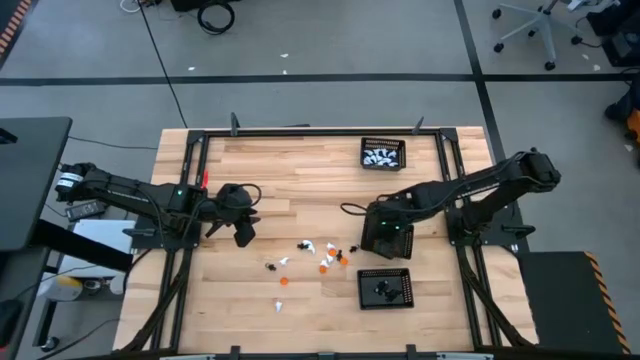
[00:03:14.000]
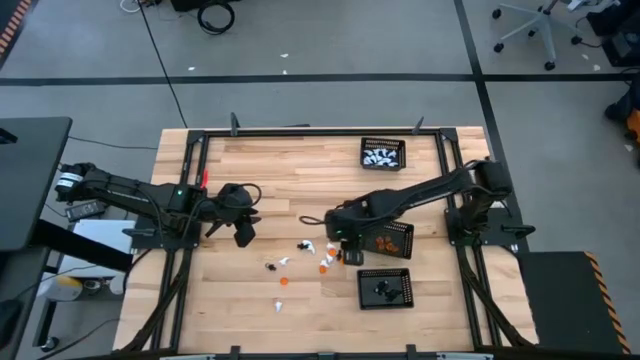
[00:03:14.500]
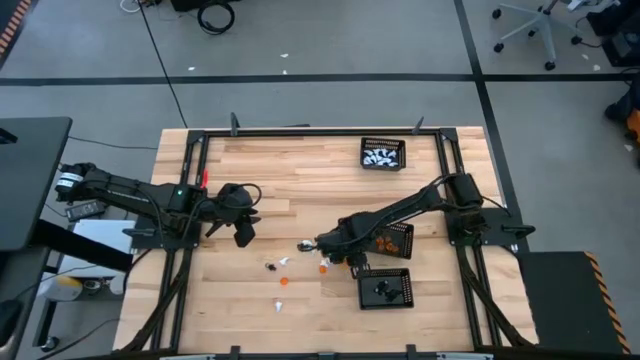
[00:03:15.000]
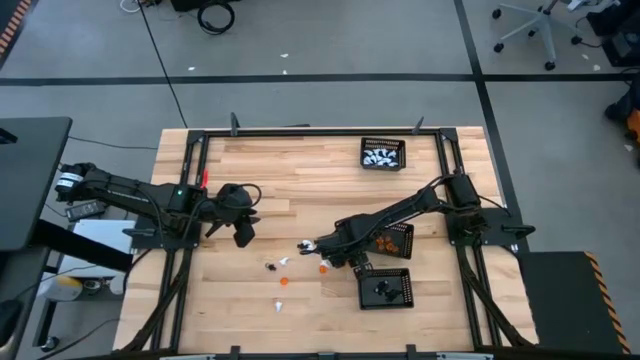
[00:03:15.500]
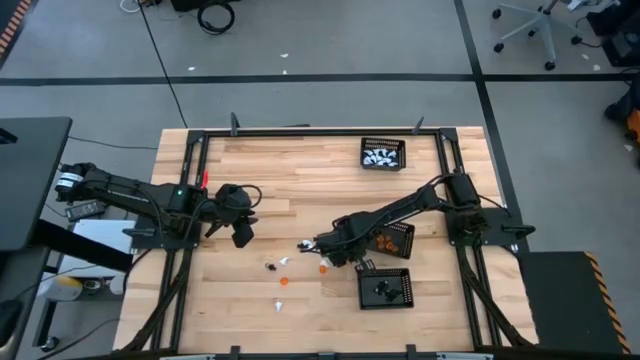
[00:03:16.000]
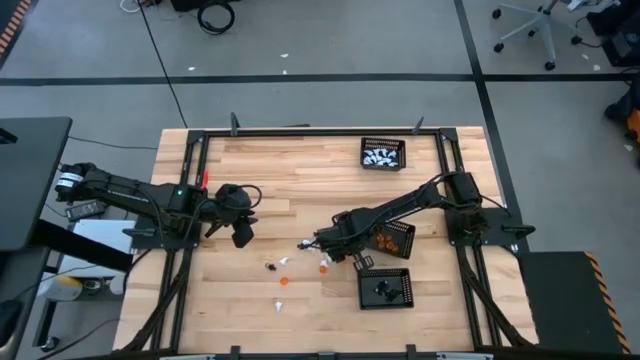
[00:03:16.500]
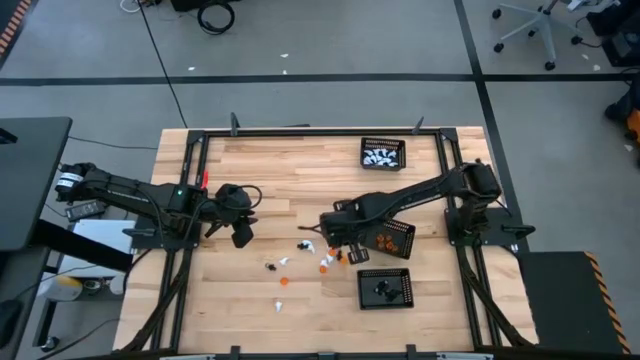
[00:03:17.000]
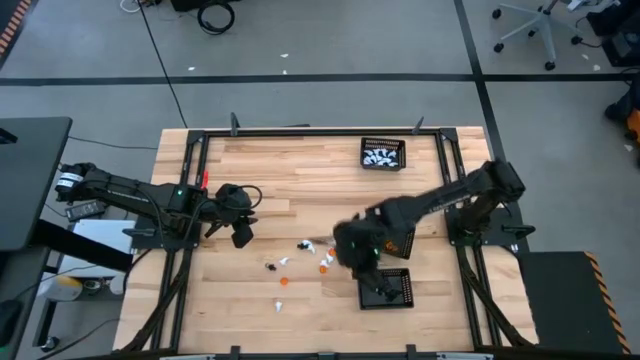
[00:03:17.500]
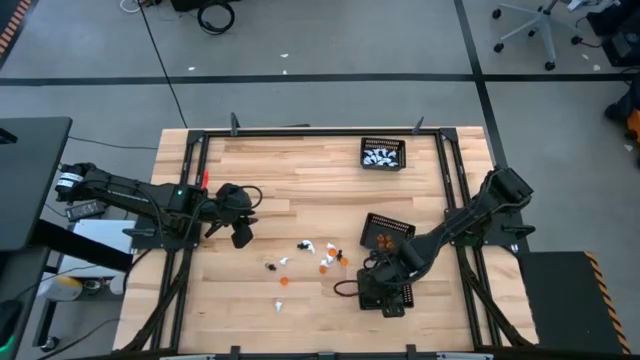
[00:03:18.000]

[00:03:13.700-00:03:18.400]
Task: Sort Halloween decoration
Put the black skeleton toy into the bottom black bin

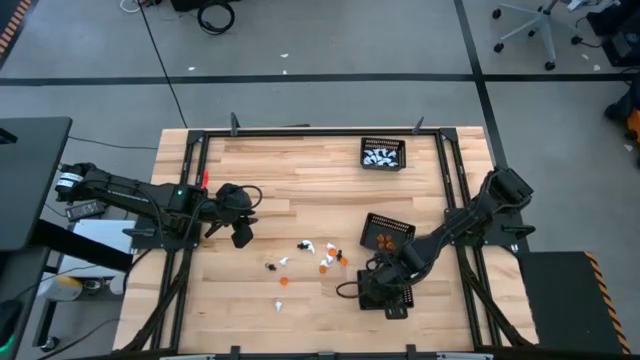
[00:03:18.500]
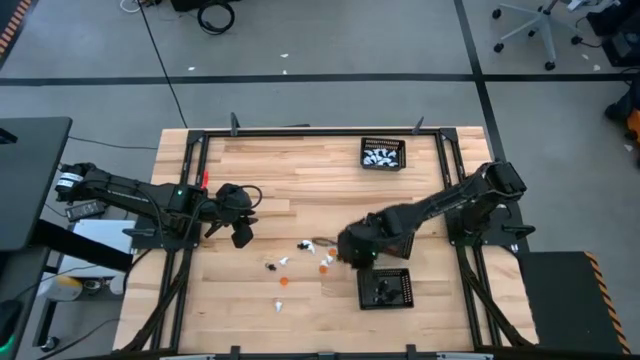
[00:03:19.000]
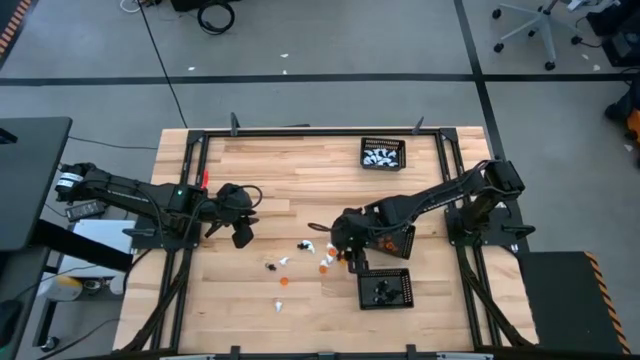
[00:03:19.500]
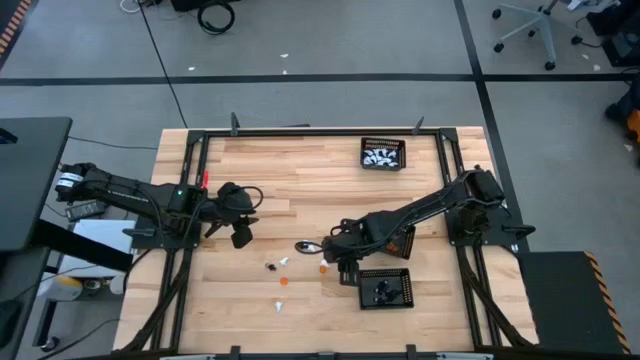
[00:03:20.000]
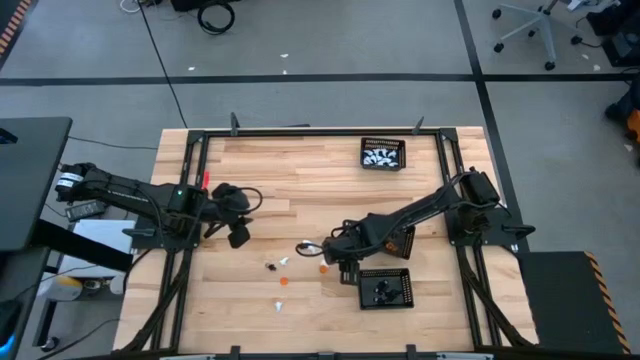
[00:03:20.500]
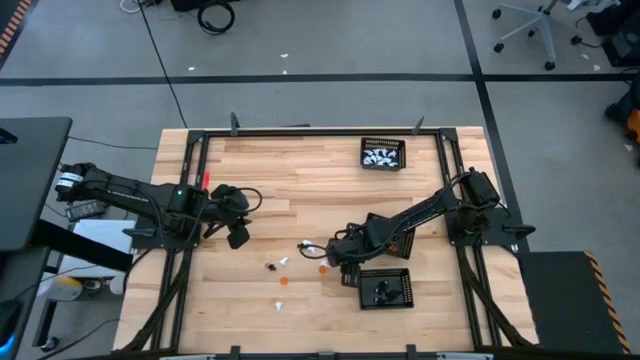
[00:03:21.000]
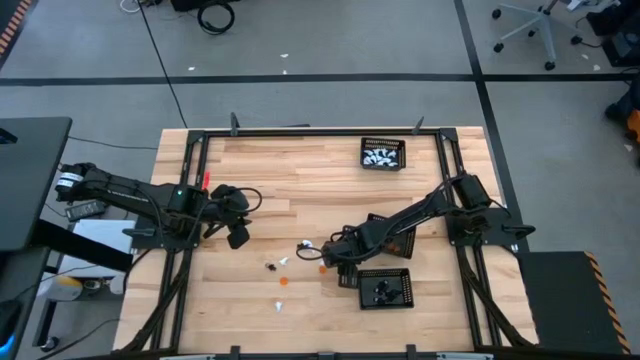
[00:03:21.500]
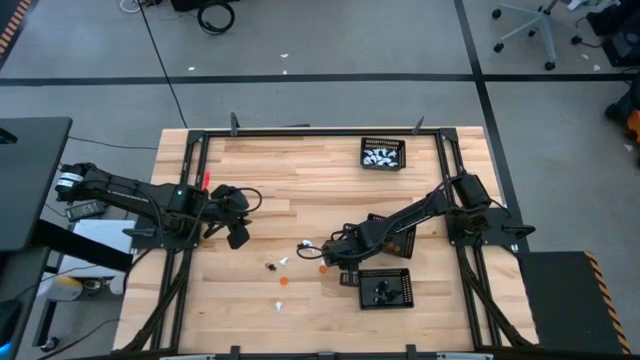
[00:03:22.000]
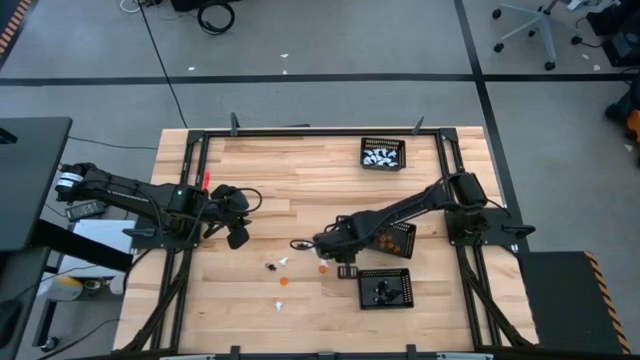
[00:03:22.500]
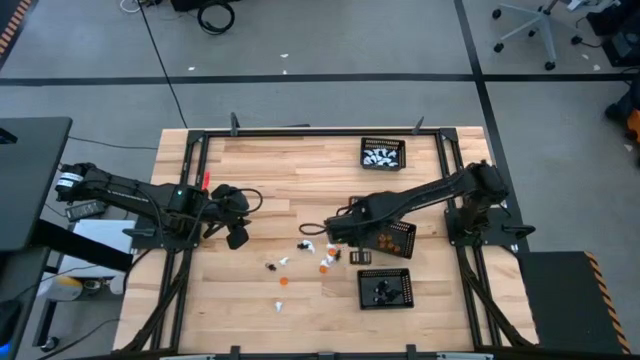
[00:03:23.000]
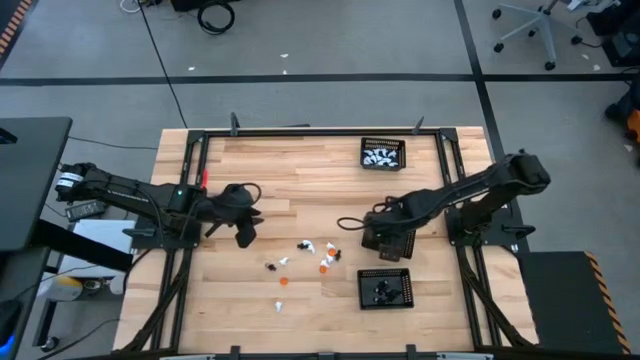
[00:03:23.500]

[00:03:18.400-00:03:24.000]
Put the orange pumpkin toy into the center black bin

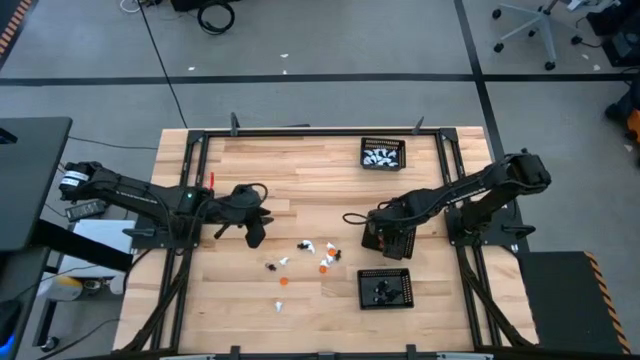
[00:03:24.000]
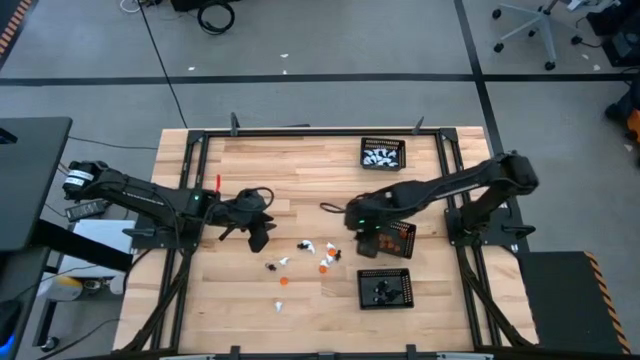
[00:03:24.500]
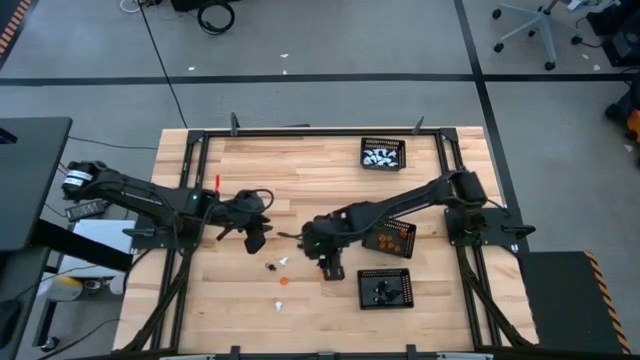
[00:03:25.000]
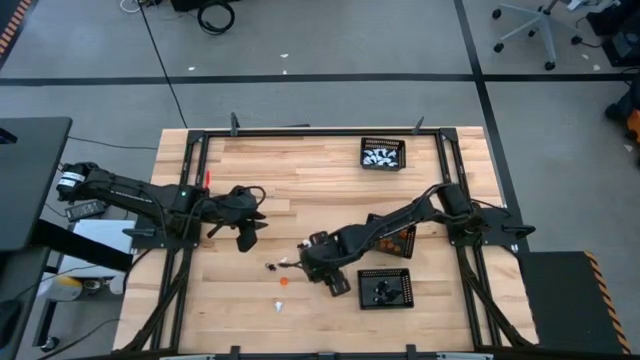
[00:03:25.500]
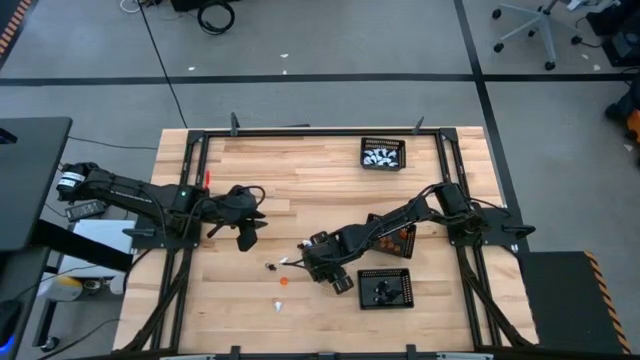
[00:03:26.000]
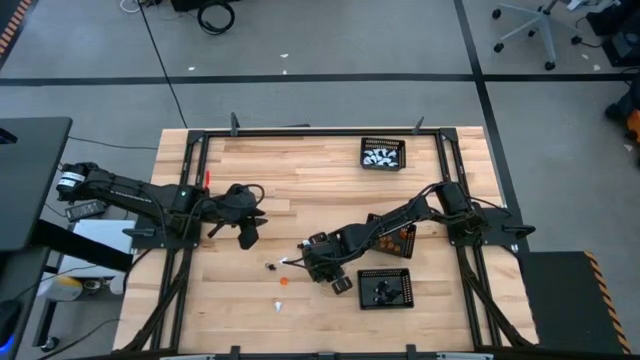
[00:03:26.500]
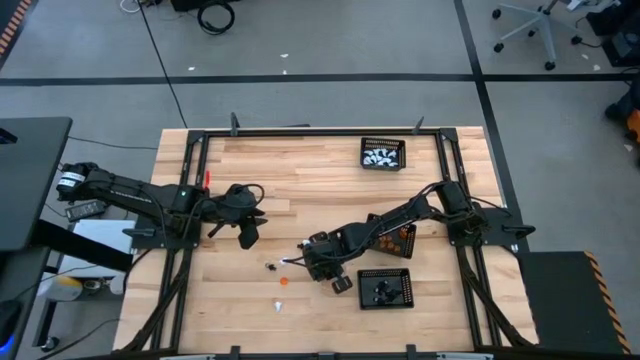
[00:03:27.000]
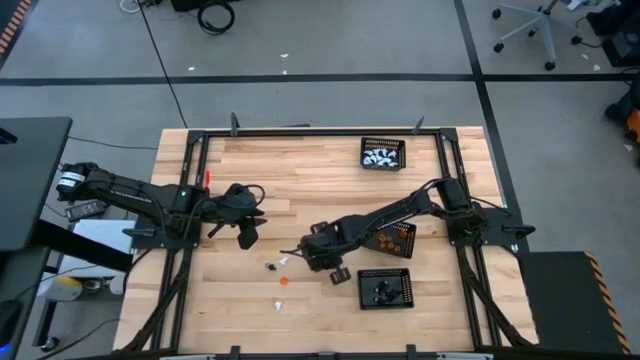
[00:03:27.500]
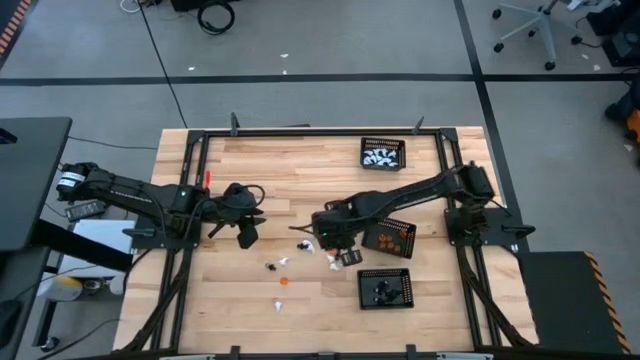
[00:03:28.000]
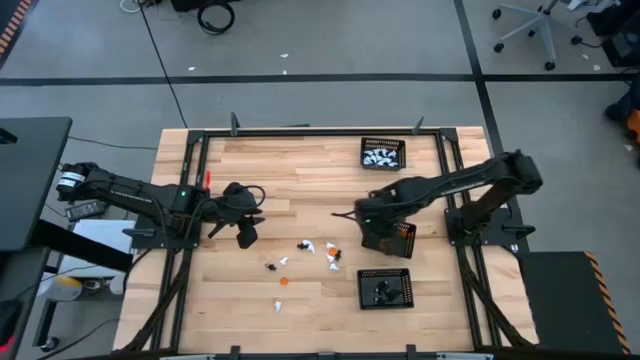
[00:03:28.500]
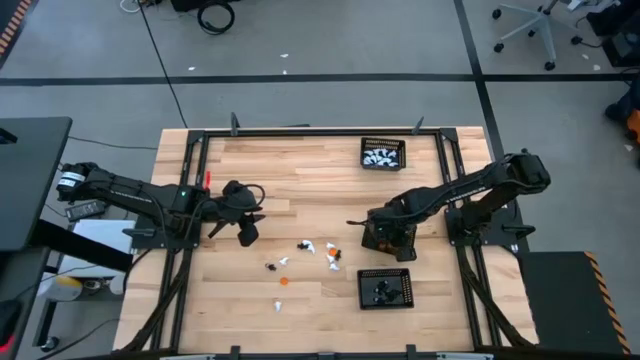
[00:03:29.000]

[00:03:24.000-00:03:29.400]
Put the orange pumpkin toy into the center black bin

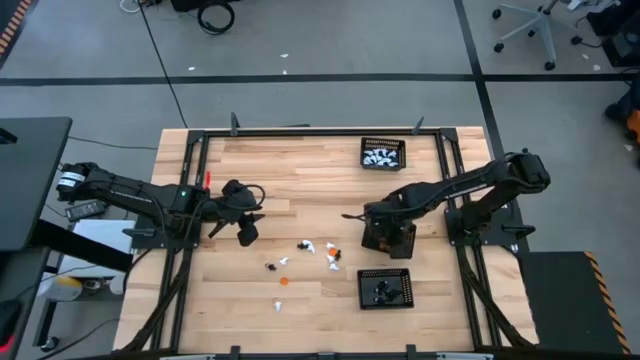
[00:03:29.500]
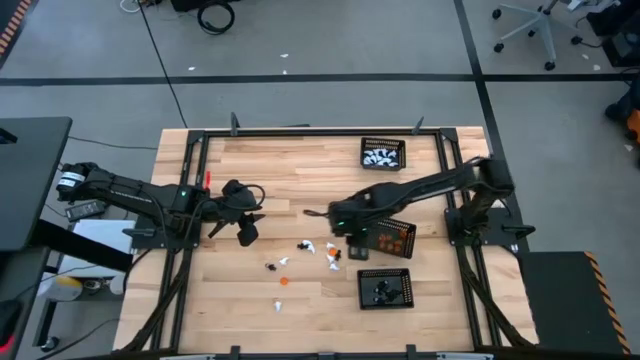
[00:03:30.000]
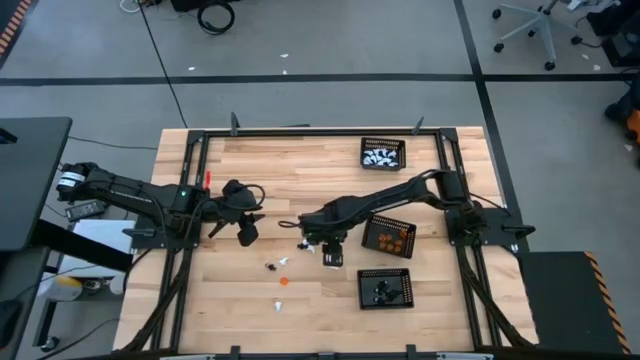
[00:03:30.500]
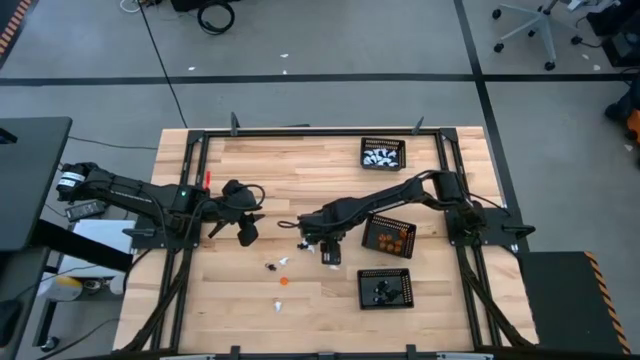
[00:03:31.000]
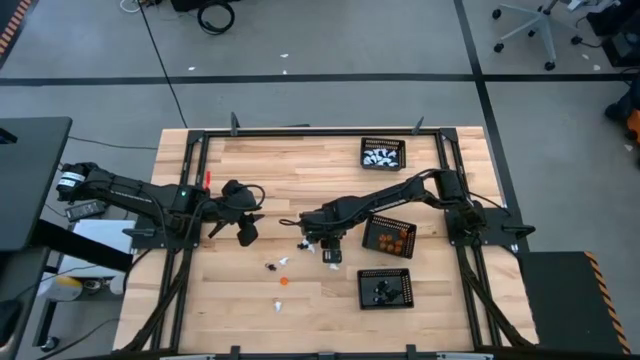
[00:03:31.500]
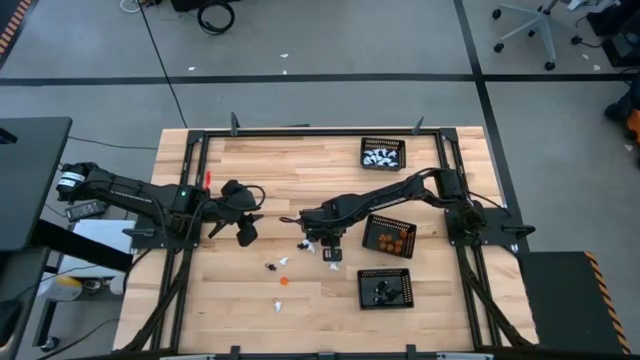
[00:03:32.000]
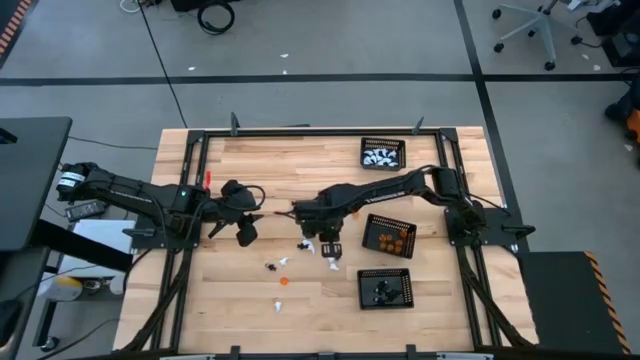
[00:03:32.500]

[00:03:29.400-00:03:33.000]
Put the white ghost toy into the top black bin

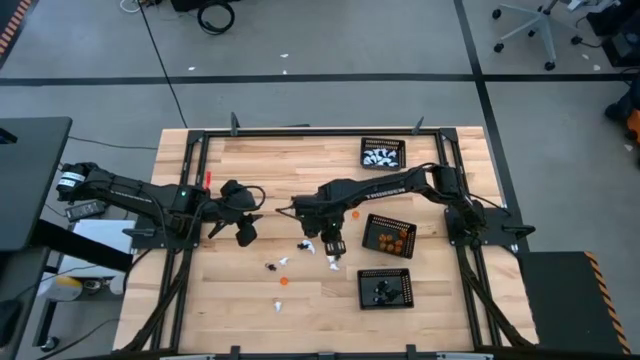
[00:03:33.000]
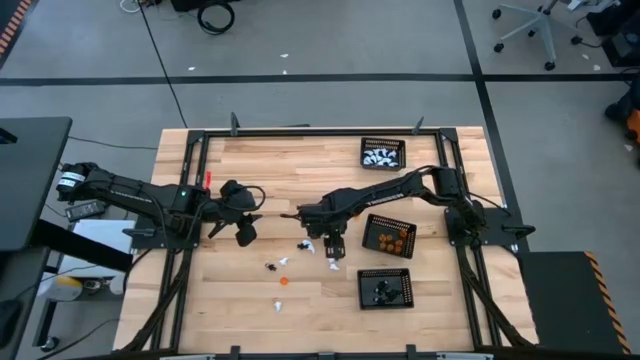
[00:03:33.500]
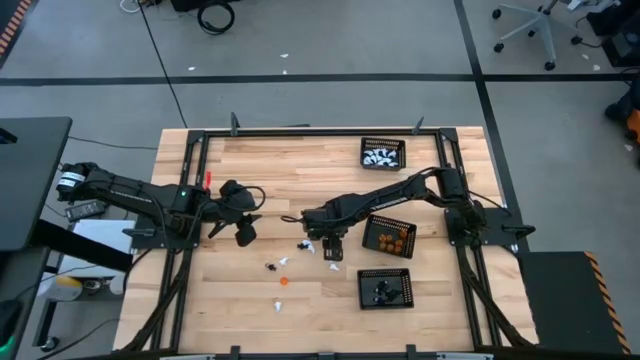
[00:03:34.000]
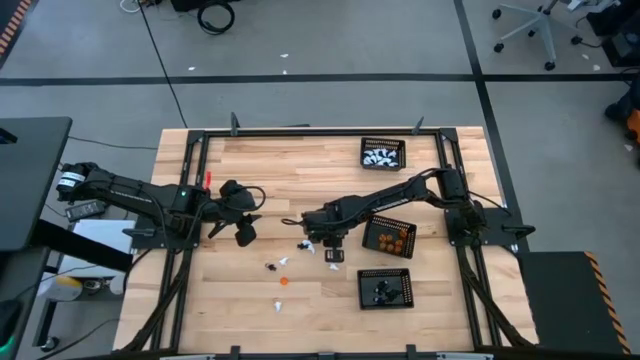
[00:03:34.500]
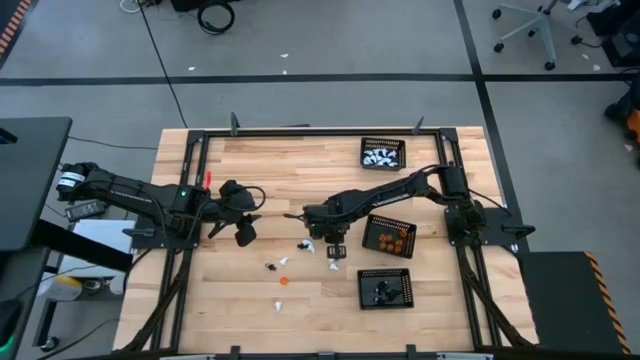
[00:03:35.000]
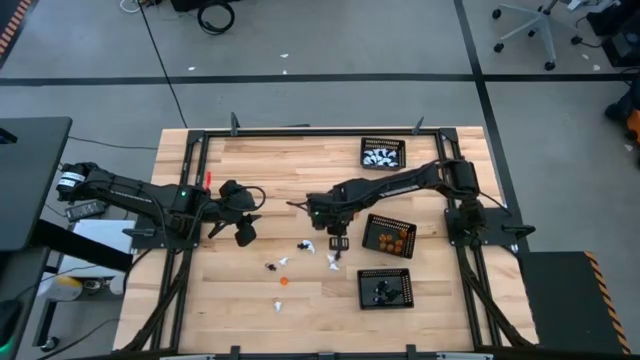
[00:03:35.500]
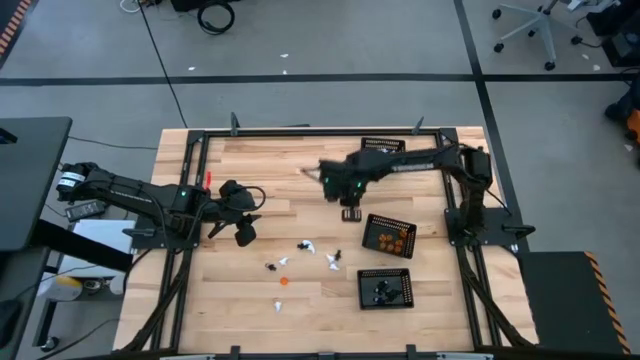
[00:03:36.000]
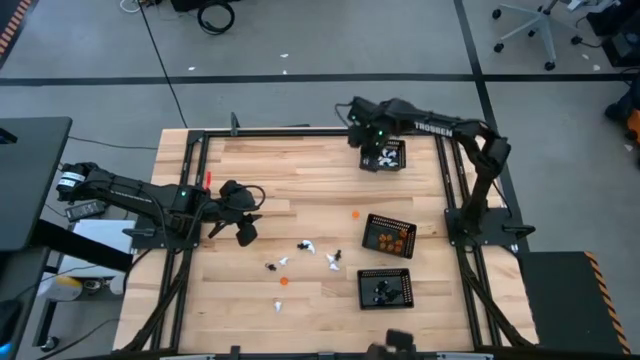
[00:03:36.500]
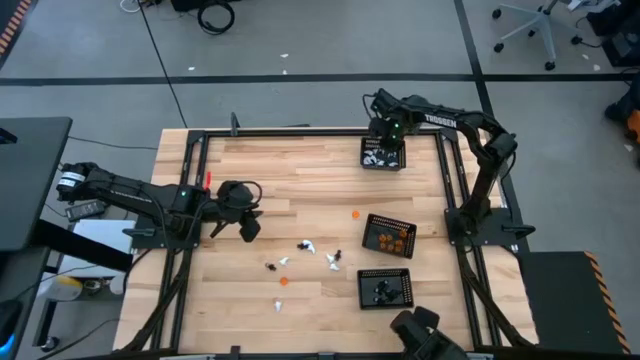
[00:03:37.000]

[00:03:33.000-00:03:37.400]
Put the white ghost toy into the top black bin
